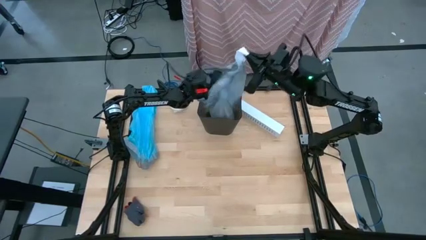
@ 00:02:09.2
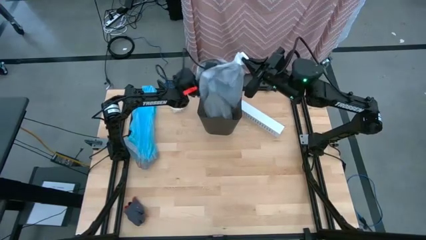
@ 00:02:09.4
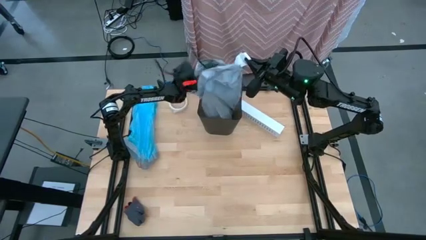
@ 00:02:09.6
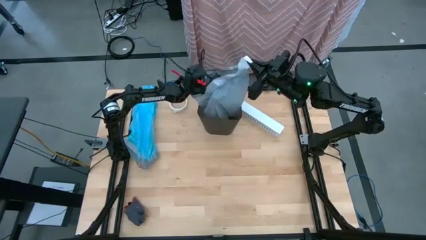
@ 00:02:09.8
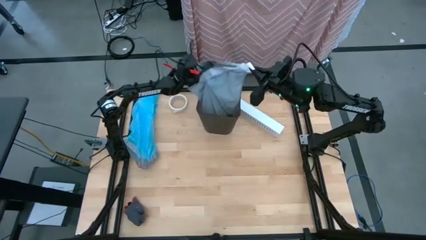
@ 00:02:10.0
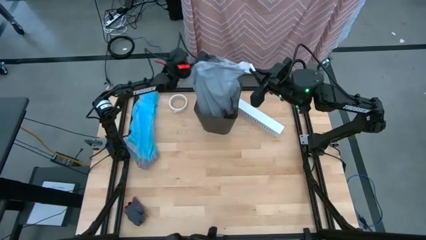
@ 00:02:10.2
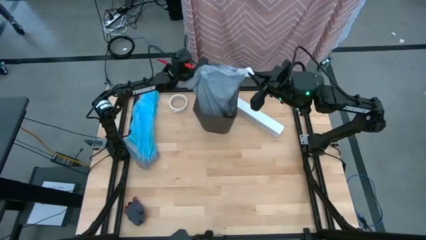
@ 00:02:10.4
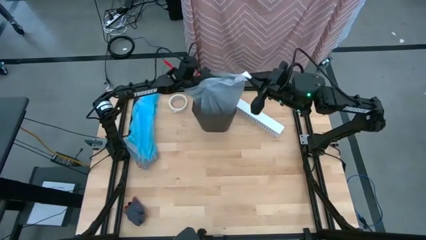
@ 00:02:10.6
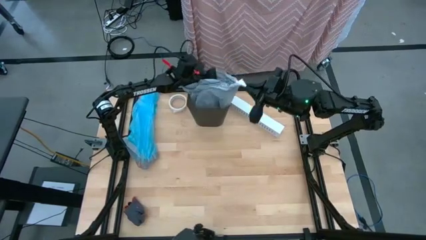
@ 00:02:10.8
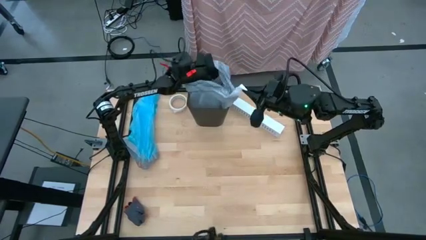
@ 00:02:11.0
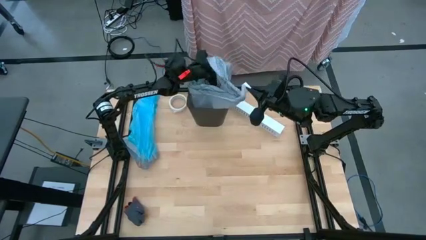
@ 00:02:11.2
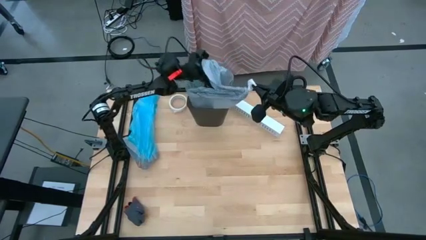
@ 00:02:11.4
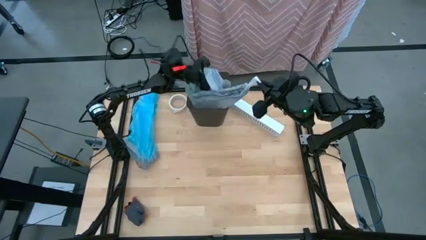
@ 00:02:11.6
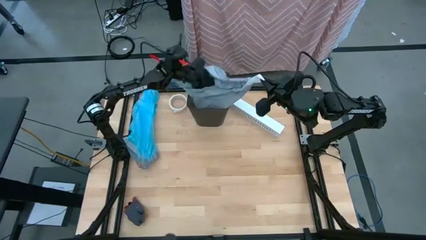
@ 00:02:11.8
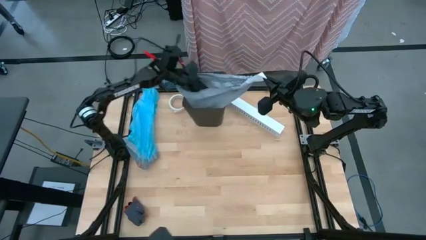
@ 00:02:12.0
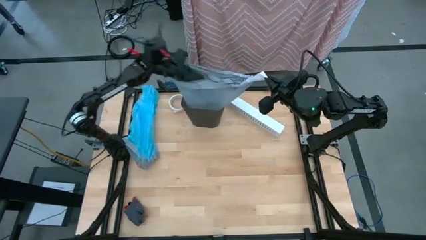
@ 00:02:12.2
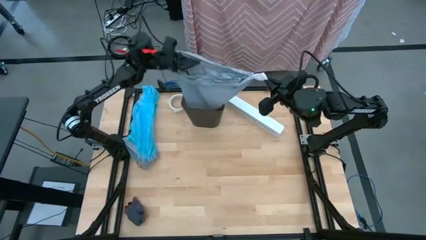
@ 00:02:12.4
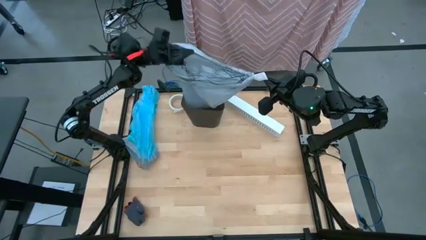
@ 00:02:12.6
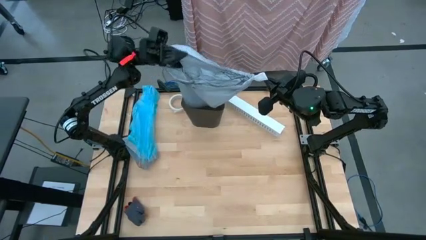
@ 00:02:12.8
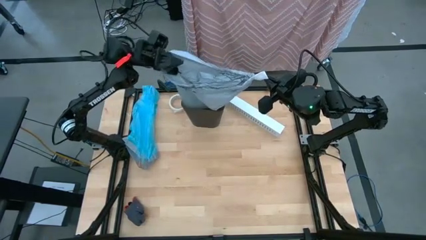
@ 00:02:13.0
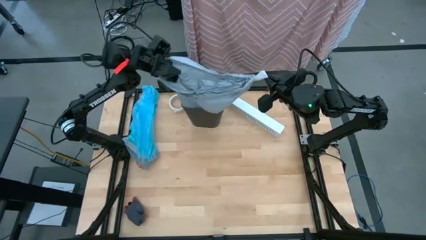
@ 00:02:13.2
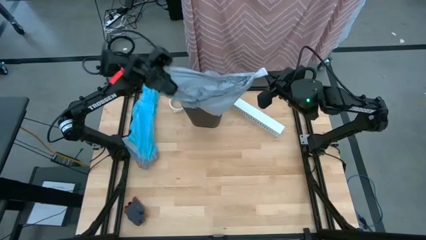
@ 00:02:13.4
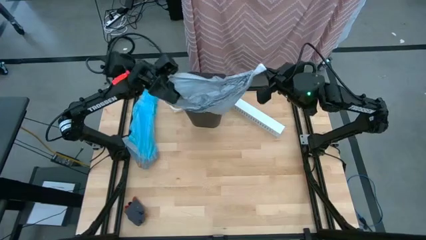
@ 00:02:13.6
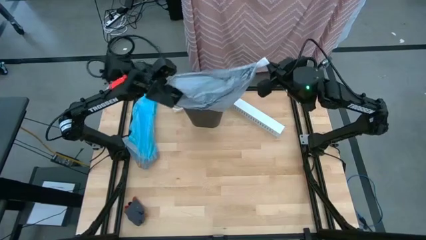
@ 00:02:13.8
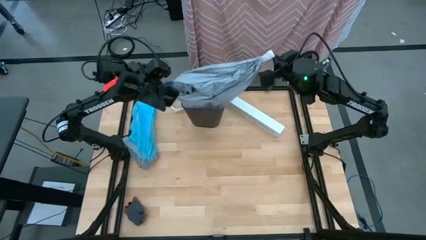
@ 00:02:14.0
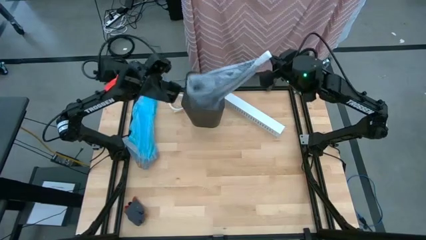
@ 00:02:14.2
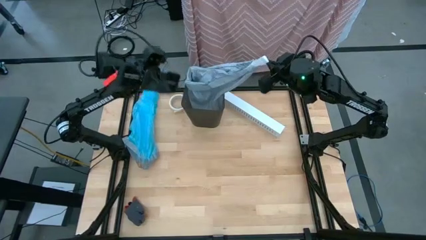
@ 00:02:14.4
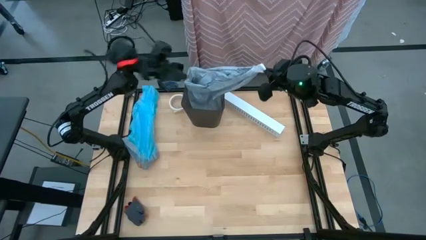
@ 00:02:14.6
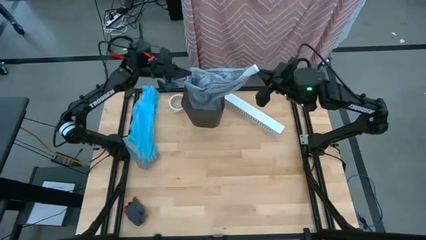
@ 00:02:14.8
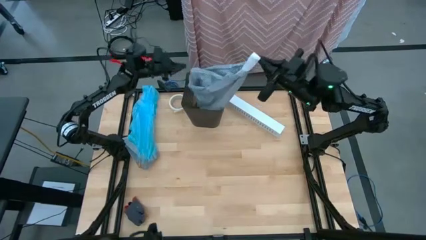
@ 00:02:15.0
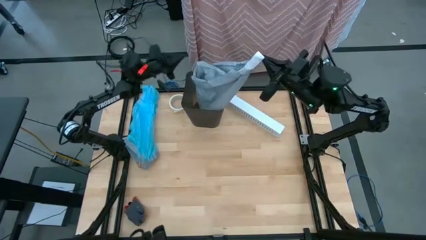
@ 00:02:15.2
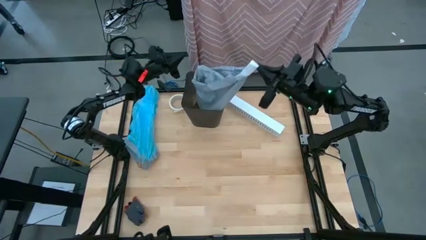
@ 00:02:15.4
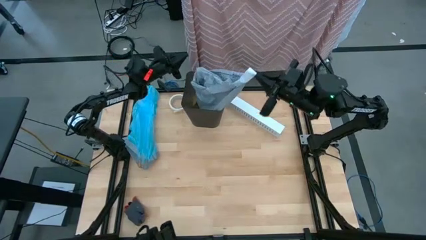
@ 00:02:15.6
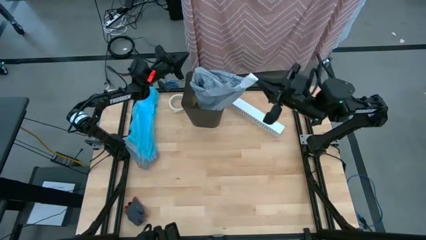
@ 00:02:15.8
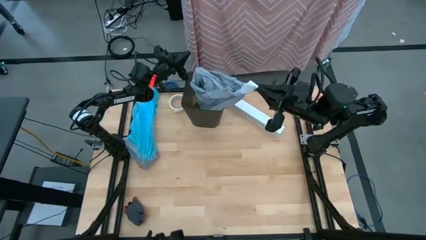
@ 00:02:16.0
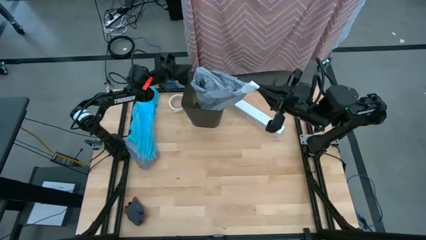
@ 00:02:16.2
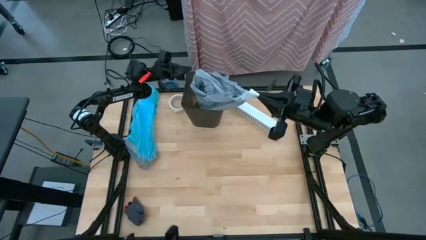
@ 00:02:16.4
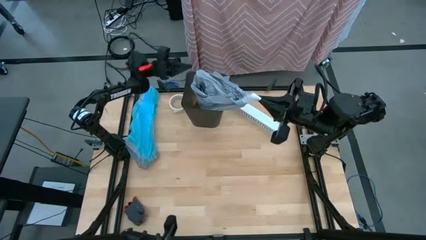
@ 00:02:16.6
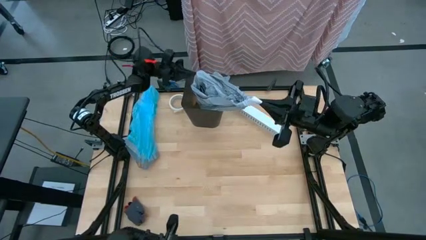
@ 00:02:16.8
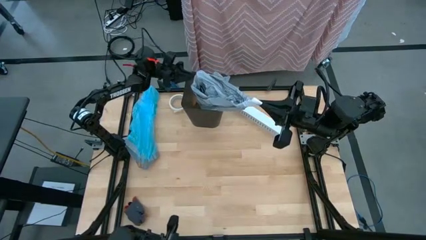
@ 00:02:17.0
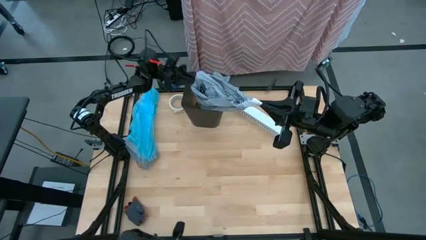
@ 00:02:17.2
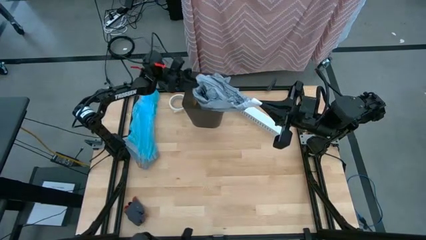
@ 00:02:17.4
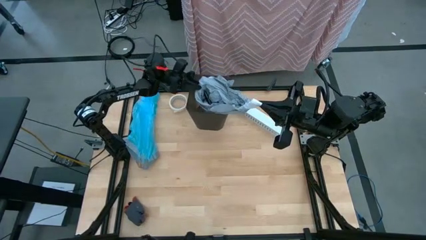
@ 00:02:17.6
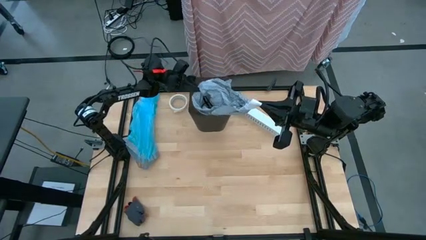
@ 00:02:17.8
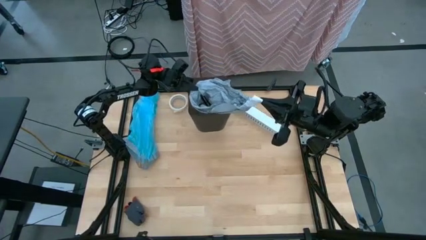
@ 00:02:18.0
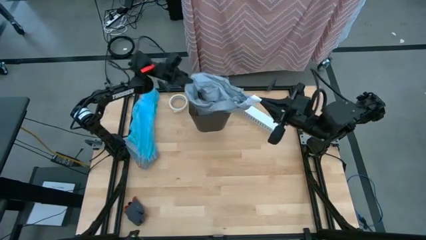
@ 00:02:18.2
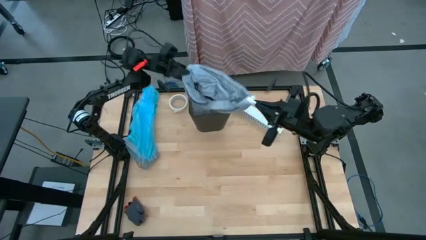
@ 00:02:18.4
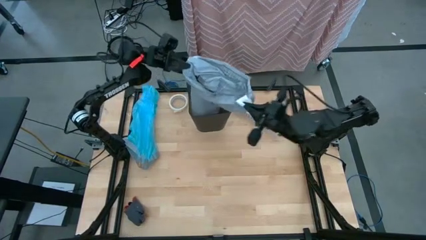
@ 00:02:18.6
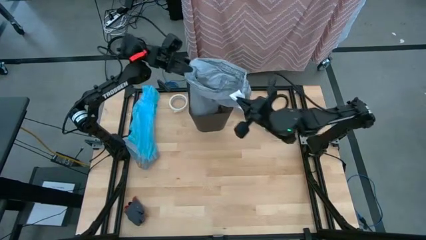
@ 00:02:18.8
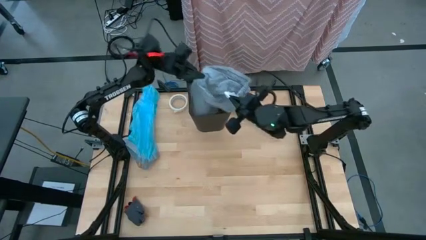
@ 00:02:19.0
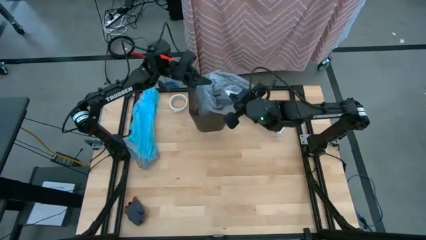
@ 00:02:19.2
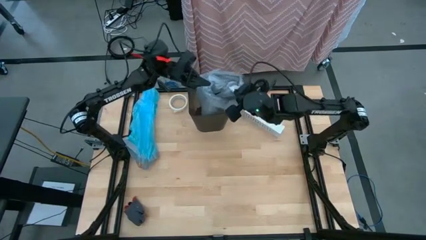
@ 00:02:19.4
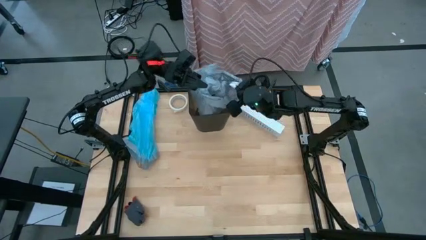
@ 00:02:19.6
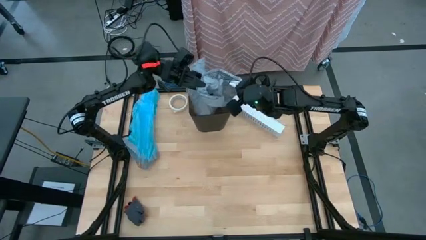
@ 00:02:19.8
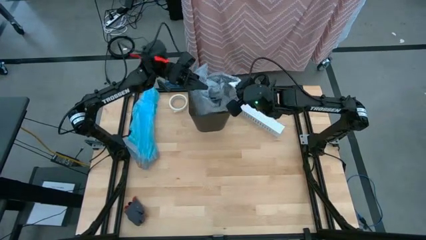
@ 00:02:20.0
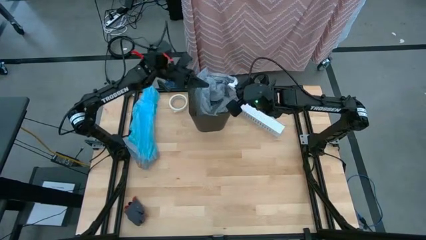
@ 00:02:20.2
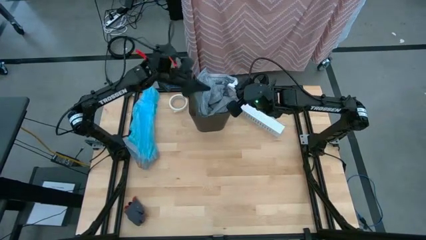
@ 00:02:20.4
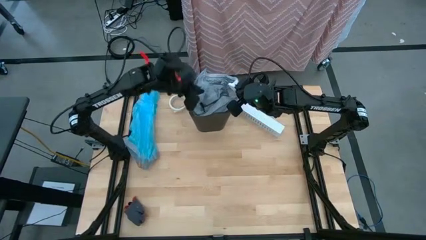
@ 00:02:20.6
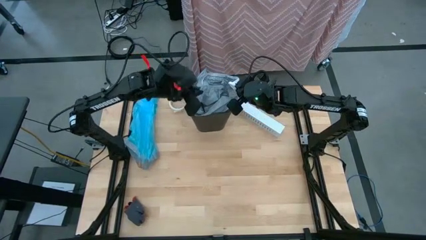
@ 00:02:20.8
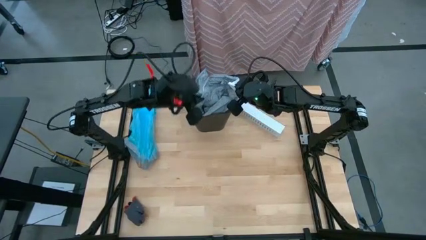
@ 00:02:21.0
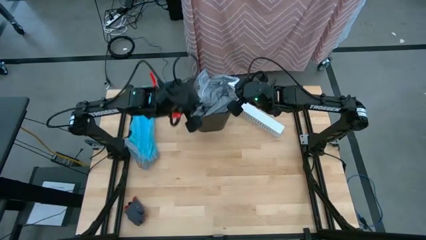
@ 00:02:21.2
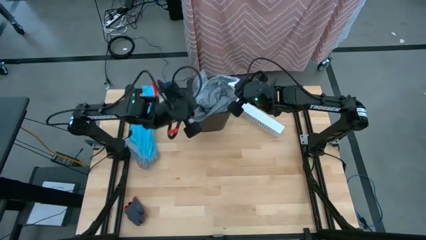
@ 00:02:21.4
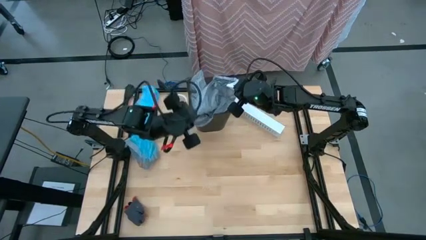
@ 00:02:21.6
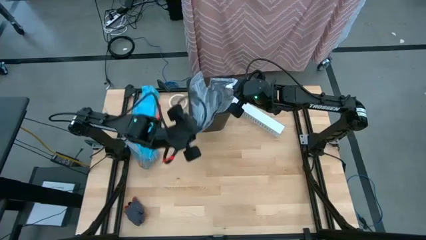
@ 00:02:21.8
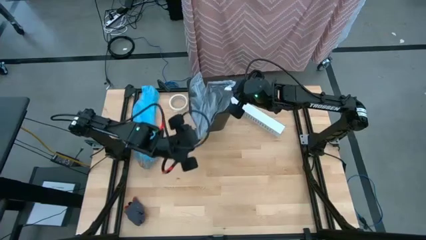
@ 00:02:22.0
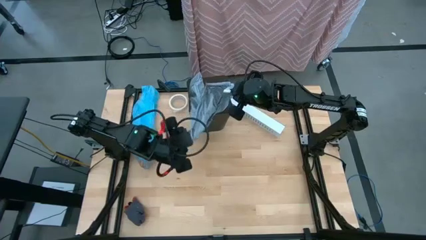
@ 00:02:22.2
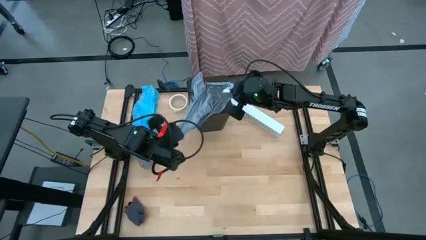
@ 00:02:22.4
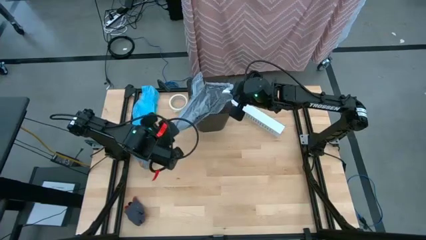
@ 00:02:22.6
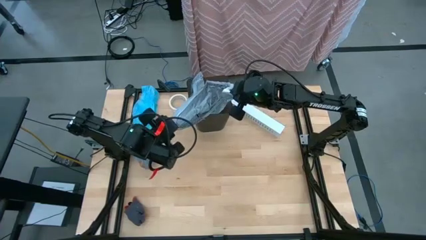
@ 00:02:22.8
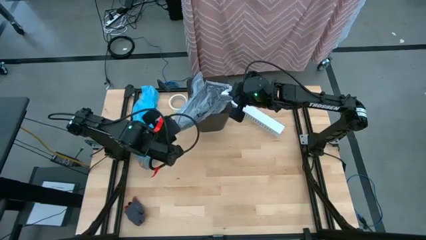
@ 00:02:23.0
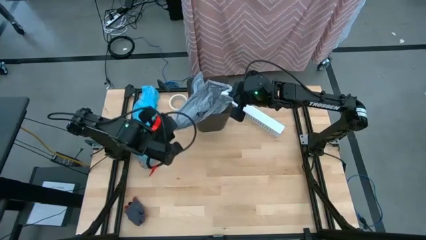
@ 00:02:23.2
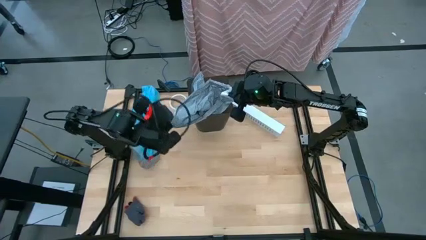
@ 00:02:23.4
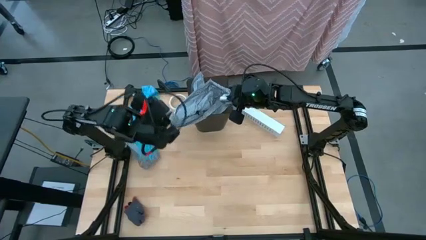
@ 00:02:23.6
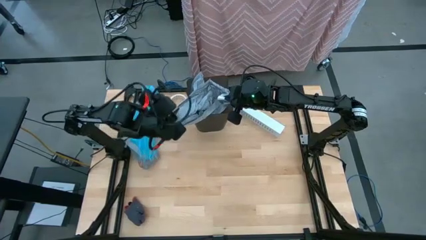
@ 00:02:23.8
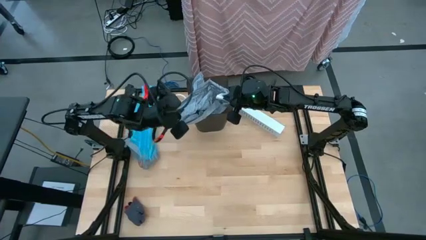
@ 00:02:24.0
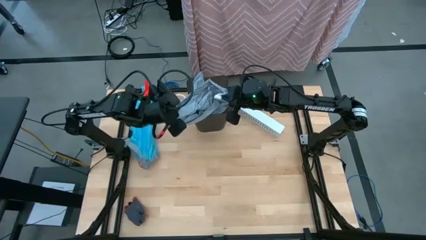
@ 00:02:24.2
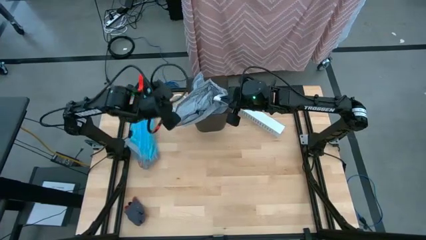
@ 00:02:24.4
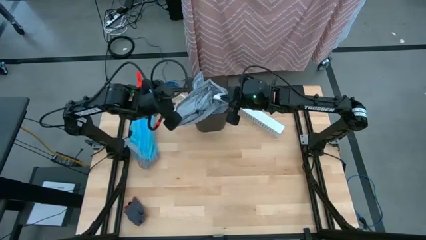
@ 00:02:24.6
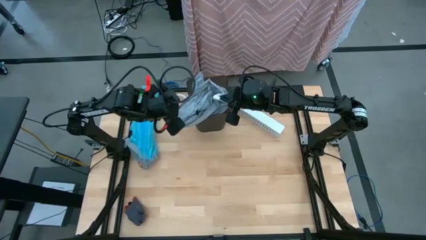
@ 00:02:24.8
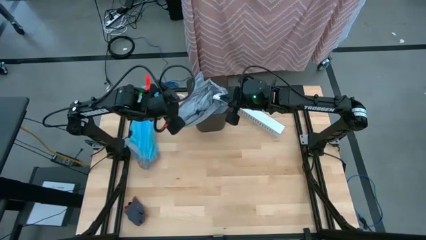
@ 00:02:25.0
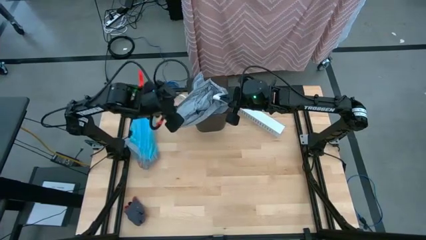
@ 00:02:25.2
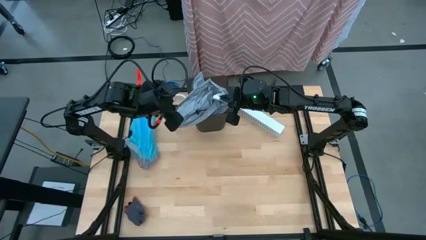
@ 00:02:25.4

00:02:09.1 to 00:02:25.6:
Task: place trash/remove bag and relplace
Remove the trash bag from the trash bin
